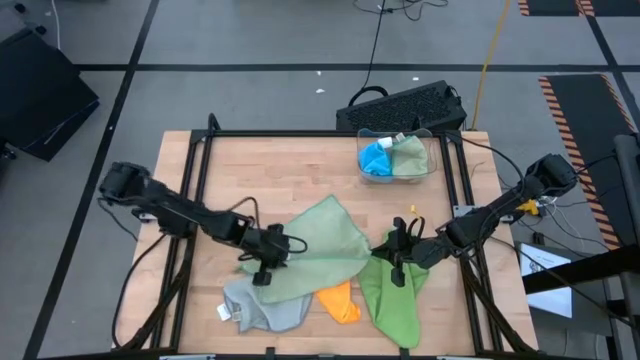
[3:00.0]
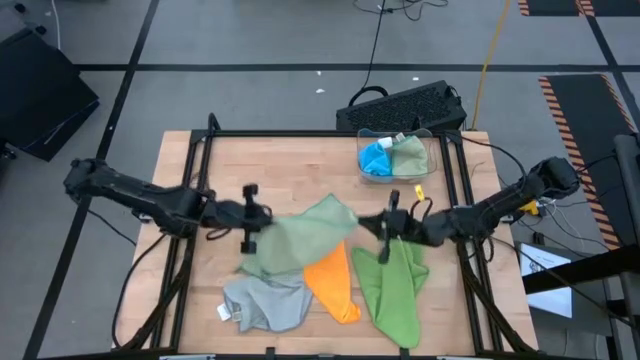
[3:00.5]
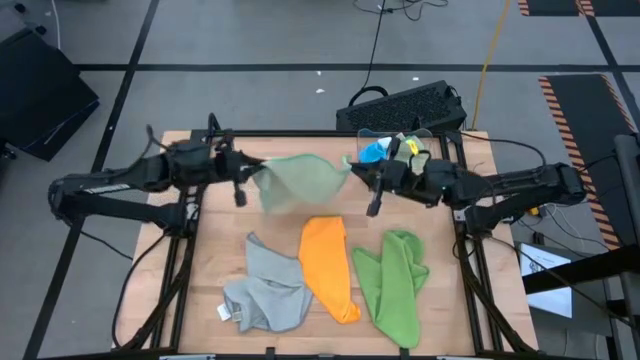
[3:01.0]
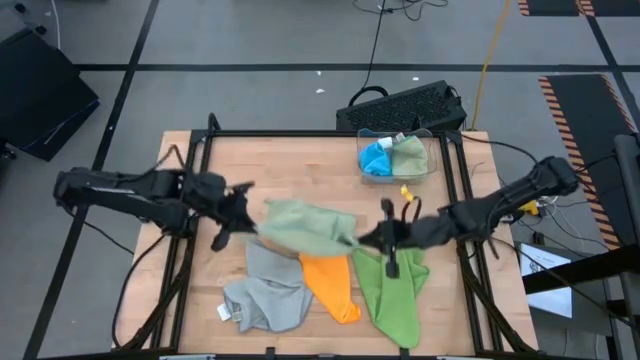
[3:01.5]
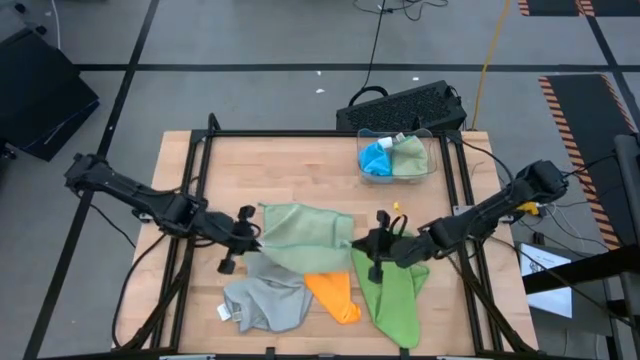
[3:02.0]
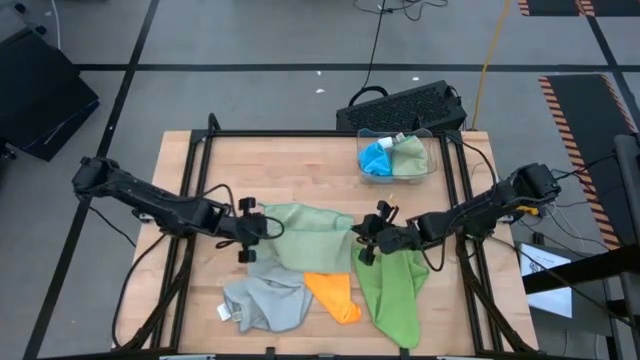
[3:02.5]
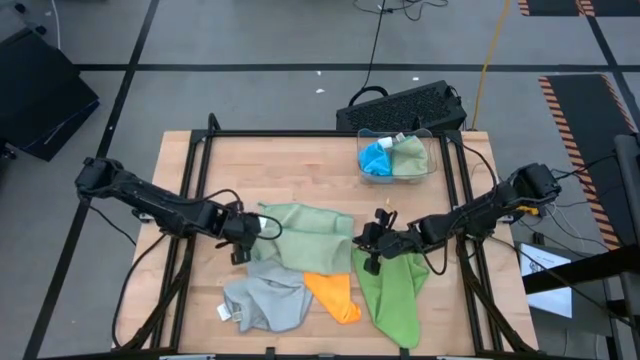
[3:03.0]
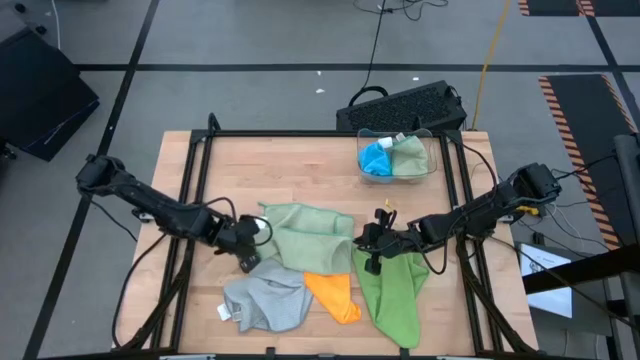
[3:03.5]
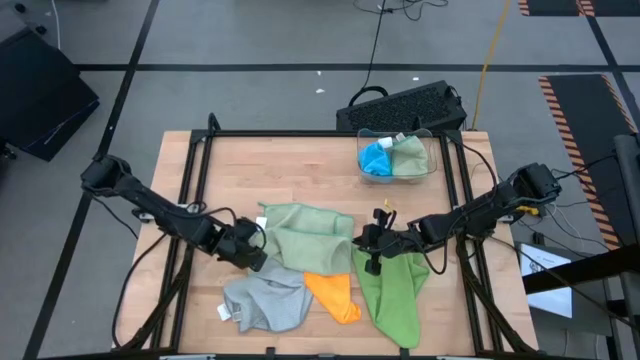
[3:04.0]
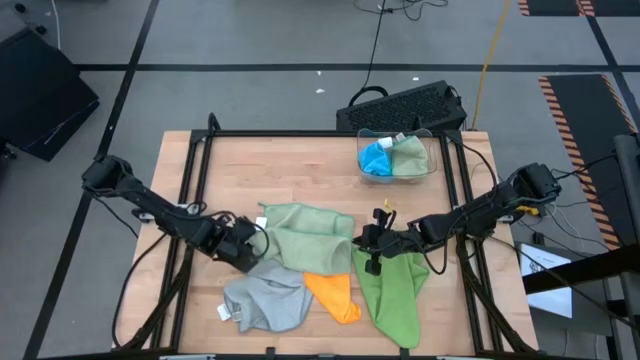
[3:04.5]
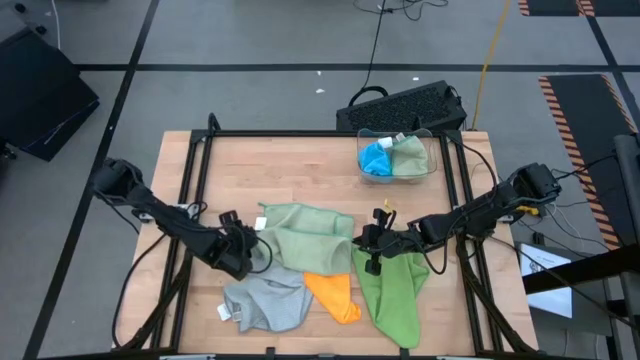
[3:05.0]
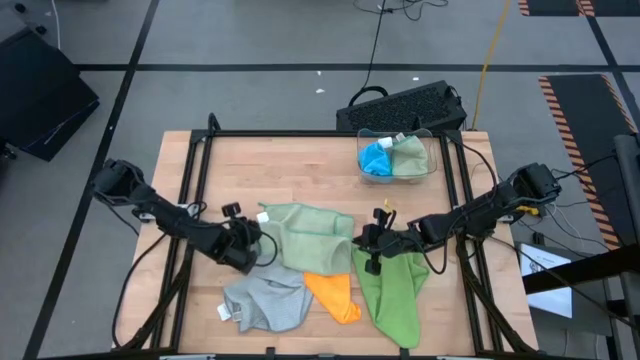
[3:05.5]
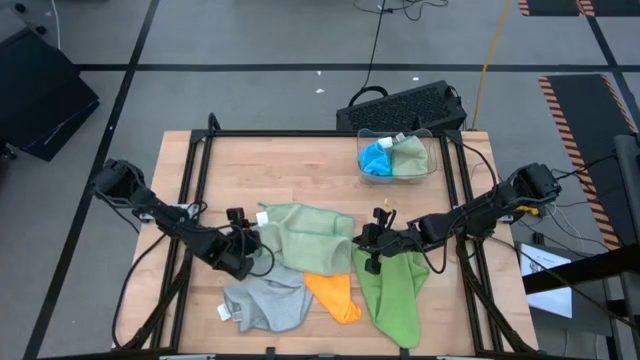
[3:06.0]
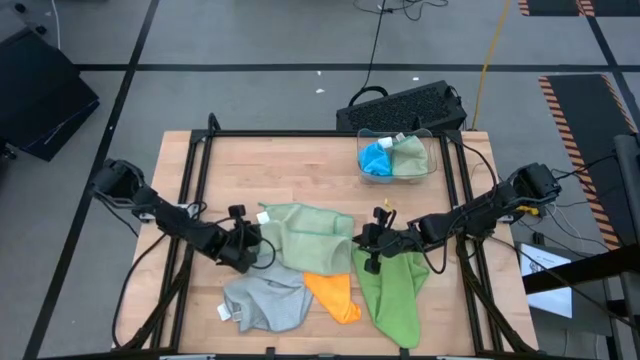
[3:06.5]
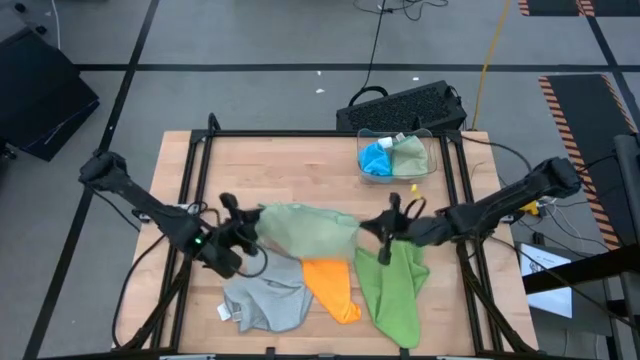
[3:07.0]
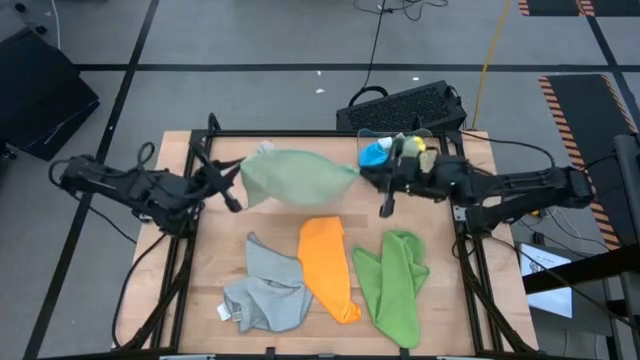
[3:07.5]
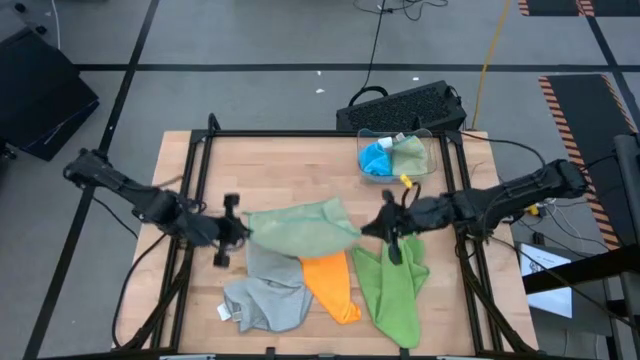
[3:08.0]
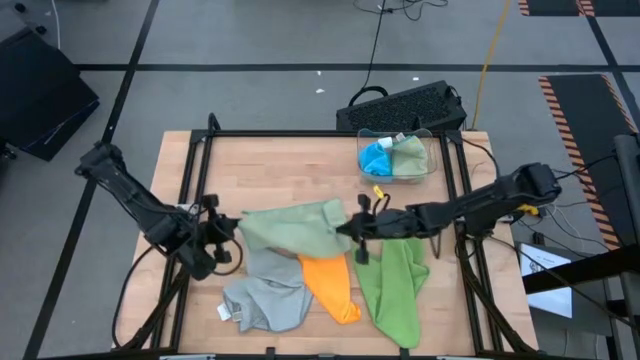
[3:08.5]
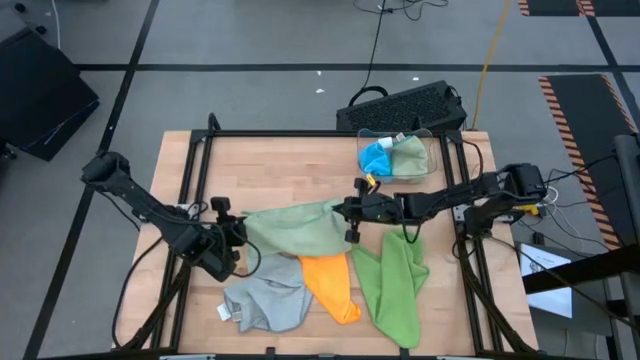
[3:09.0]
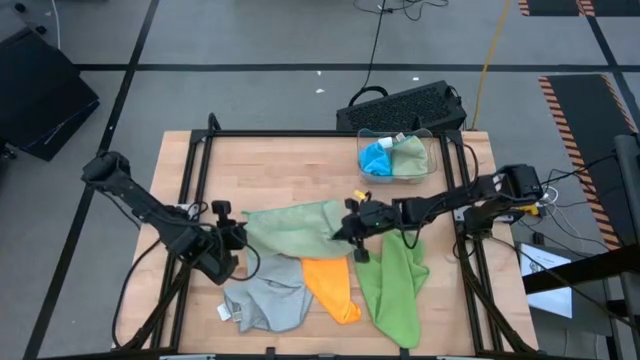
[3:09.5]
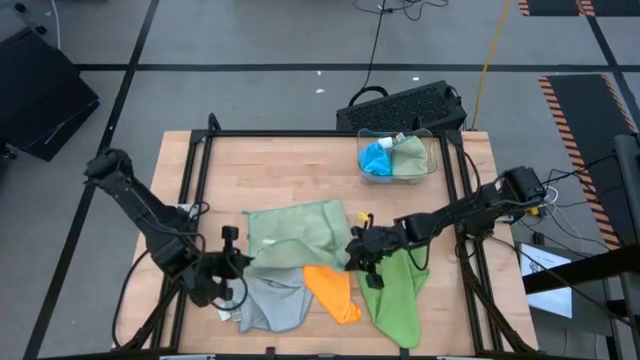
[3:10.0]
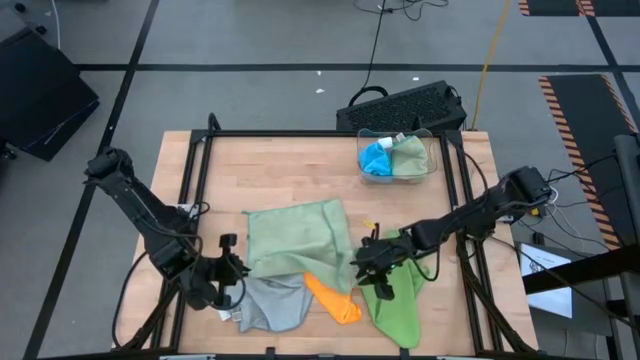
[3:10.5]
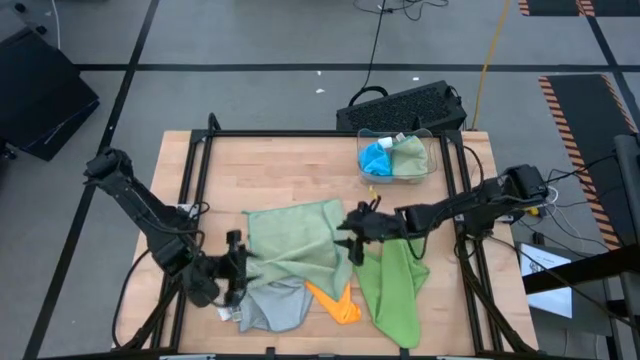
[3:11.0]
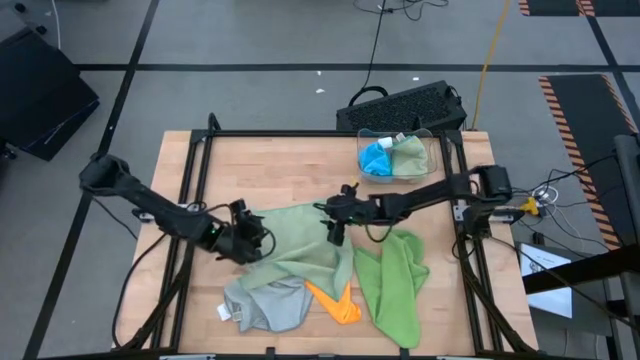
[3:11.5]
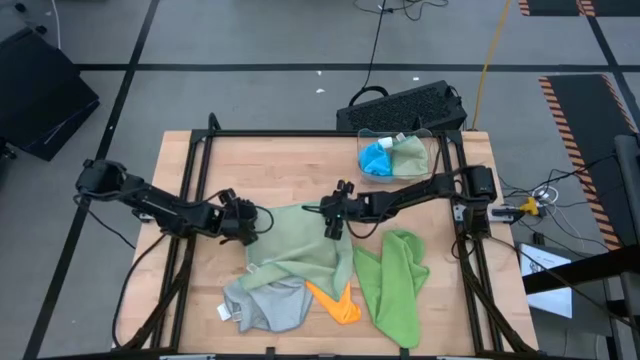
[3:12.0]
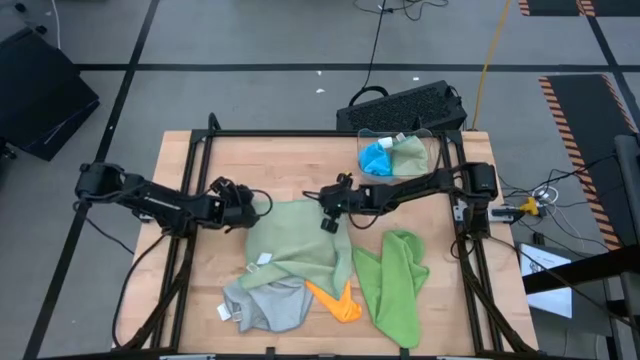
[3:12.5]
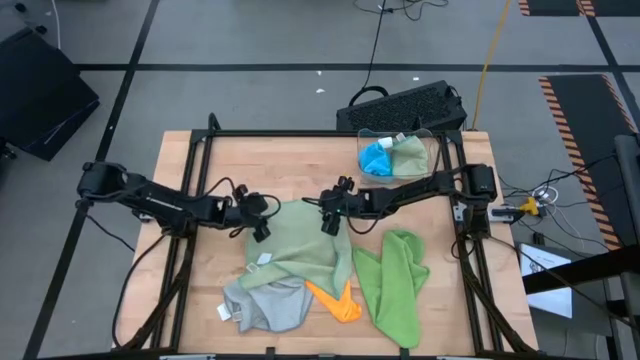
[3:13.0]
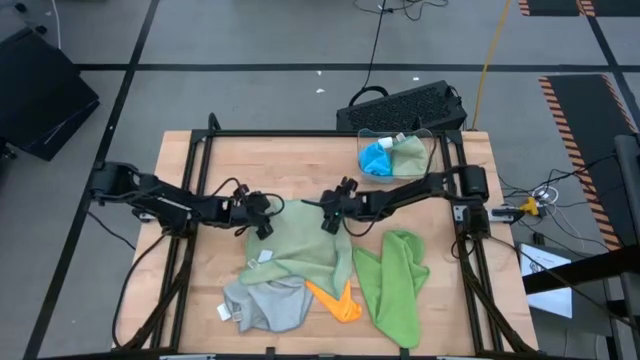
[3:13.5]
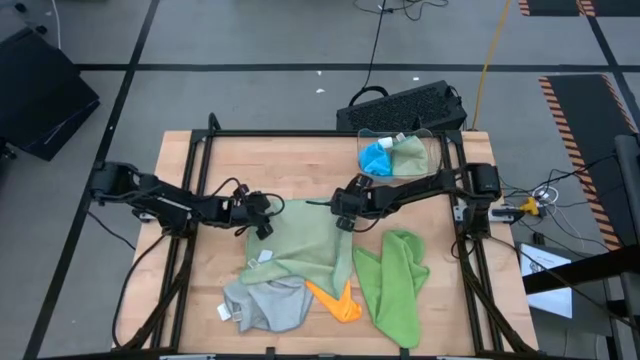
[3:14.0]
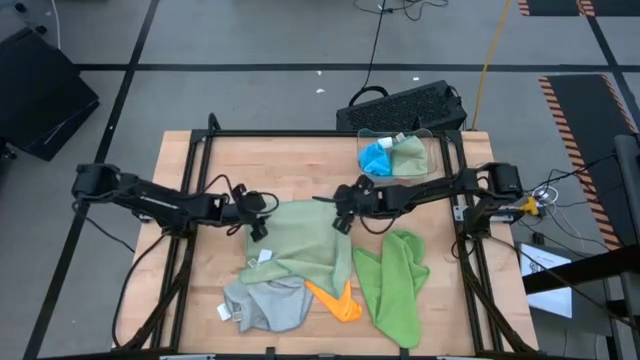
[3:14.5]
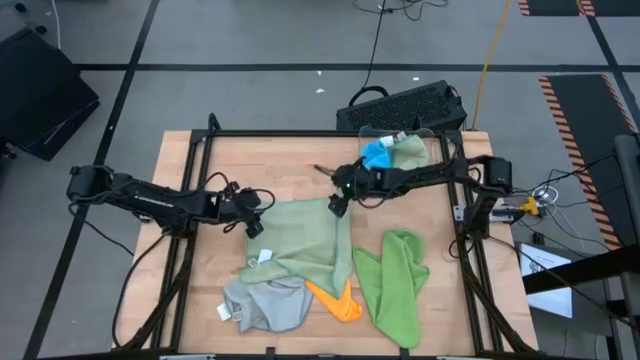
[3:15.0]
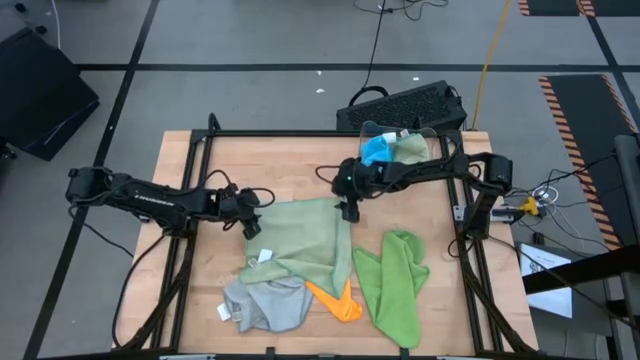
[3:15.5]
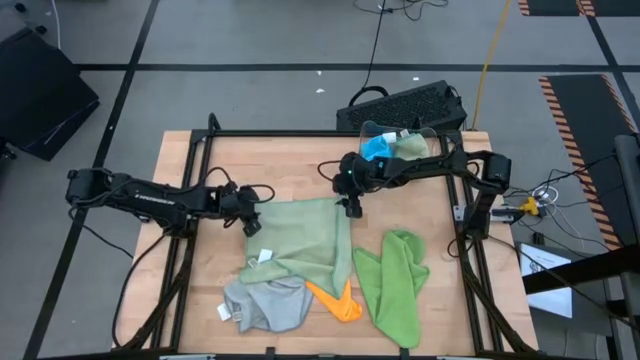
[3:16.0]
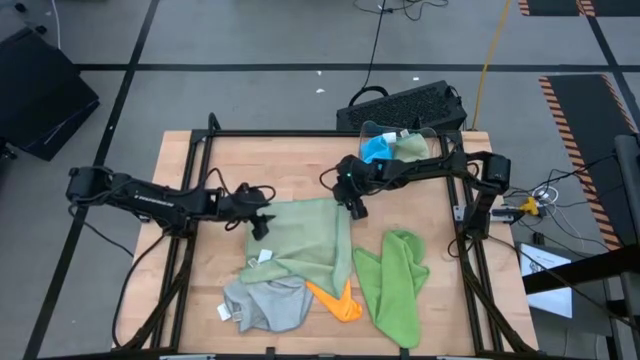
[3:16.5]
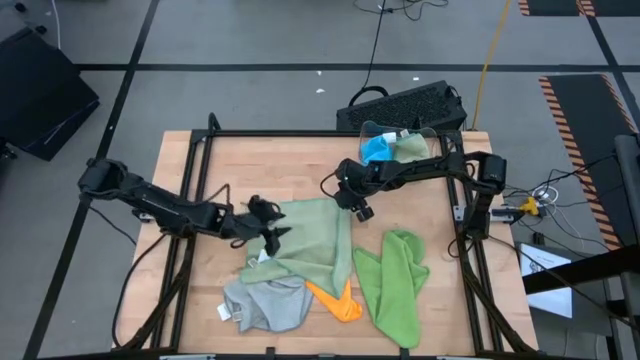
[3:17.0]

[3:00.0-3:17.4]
Task: Fold microfiber towels
Fold the light green microfiber towel

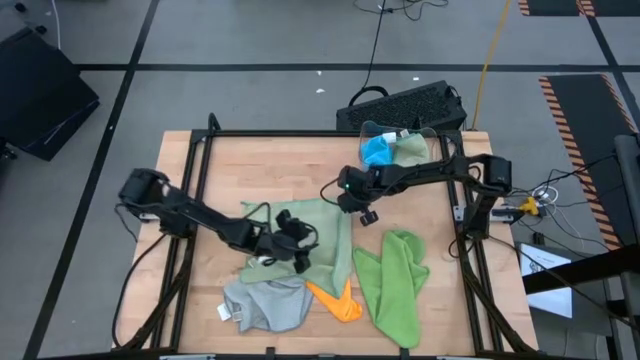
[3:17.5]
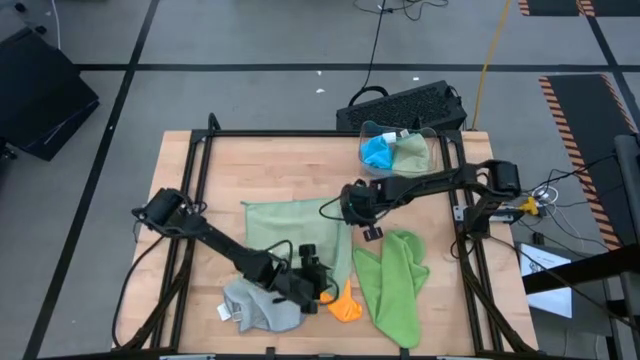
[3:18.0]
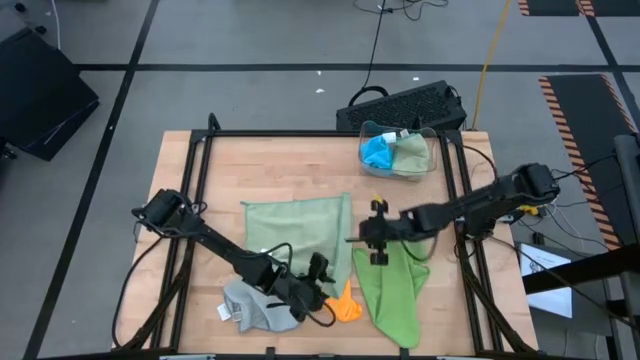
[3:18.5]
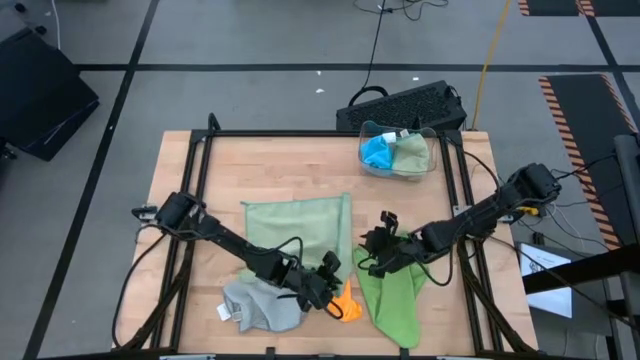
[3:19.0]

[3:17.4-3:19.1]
Fold the light green microfiber towel
